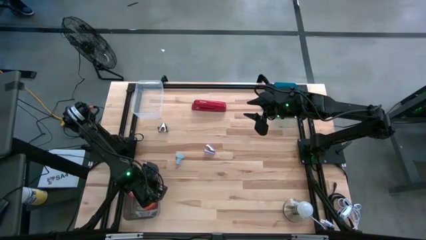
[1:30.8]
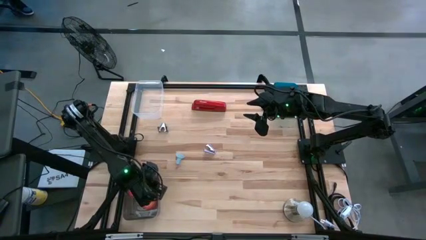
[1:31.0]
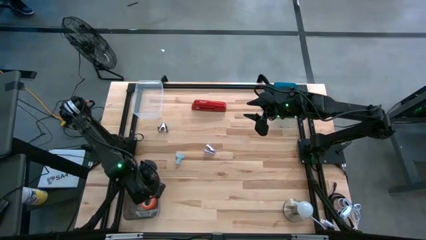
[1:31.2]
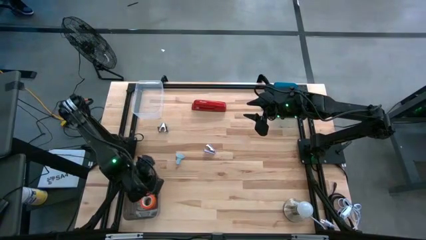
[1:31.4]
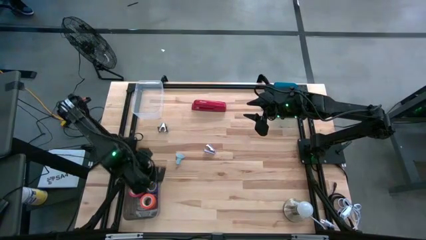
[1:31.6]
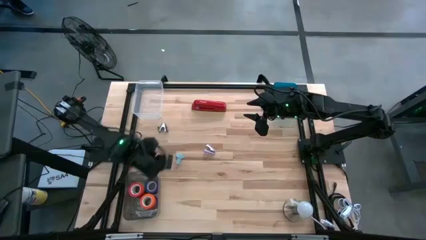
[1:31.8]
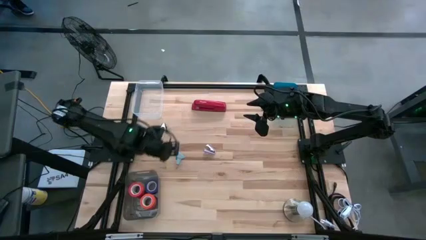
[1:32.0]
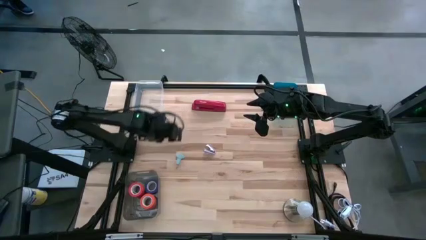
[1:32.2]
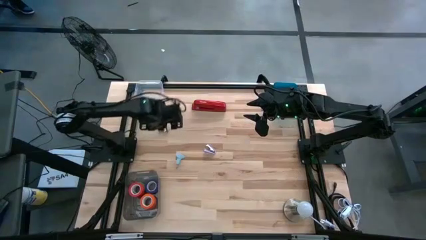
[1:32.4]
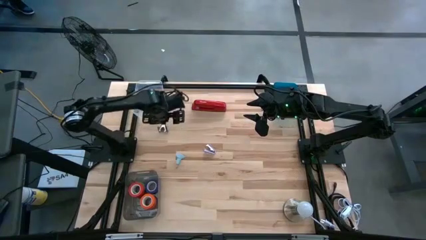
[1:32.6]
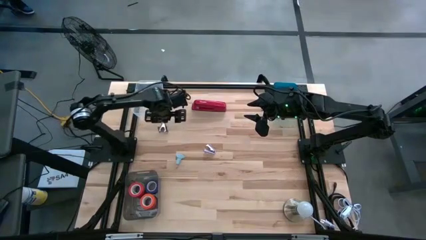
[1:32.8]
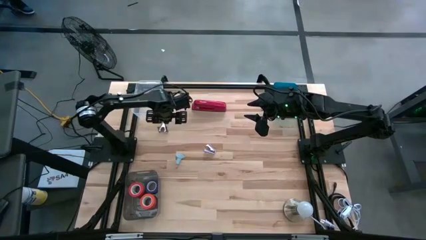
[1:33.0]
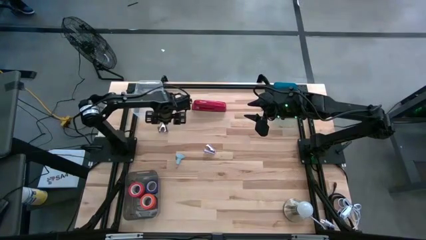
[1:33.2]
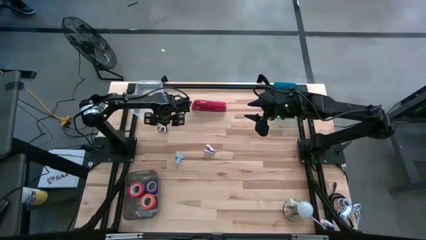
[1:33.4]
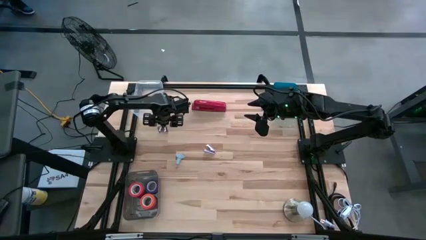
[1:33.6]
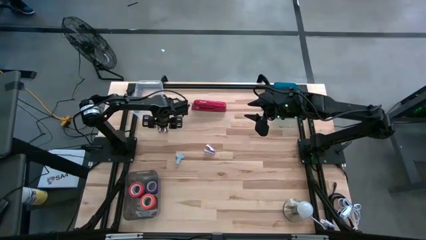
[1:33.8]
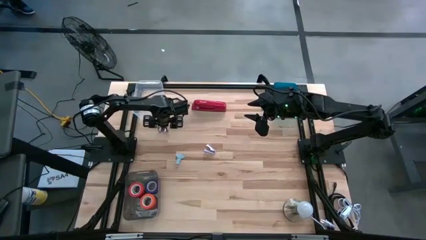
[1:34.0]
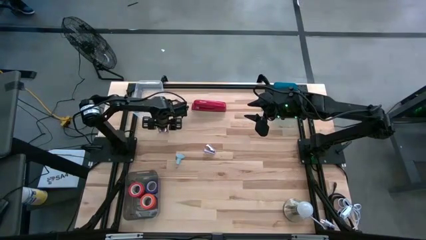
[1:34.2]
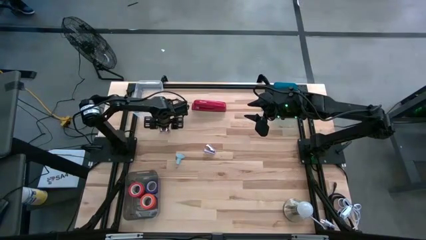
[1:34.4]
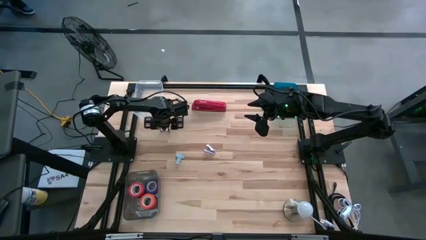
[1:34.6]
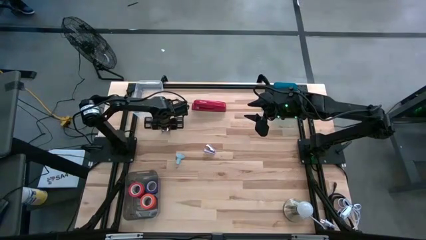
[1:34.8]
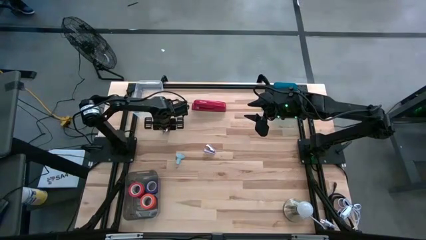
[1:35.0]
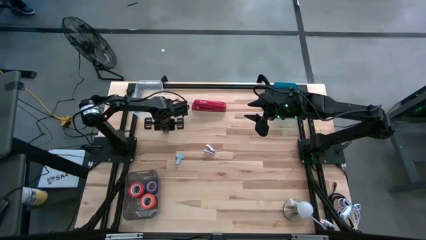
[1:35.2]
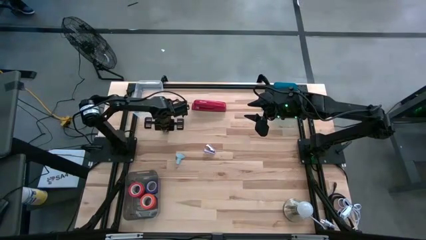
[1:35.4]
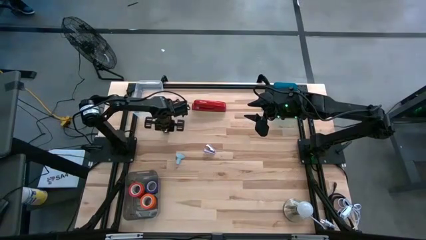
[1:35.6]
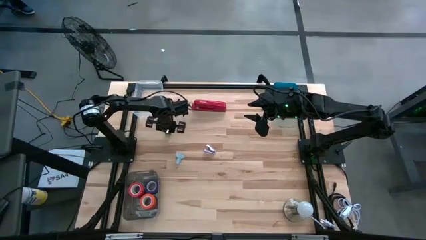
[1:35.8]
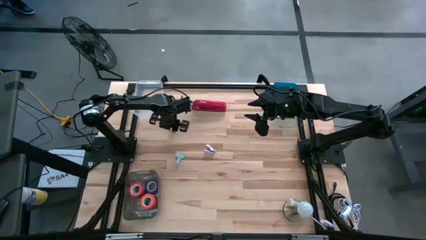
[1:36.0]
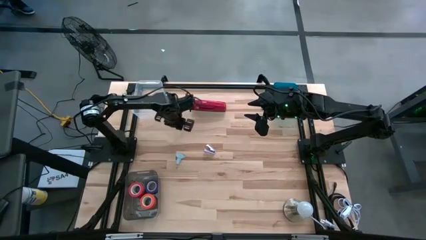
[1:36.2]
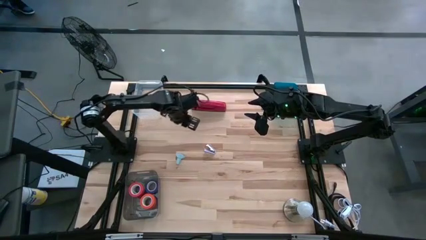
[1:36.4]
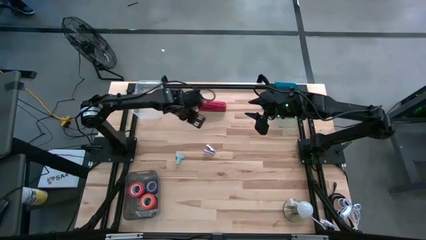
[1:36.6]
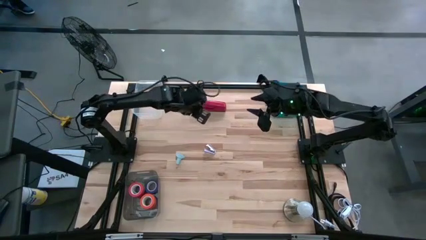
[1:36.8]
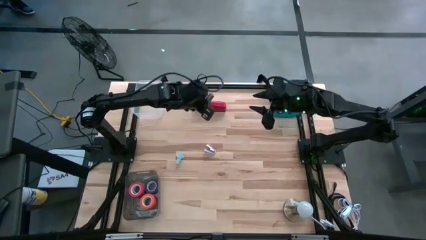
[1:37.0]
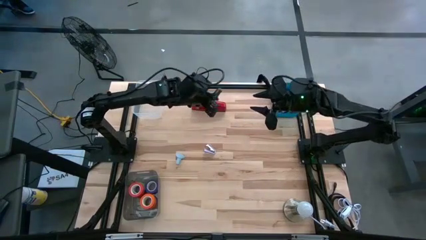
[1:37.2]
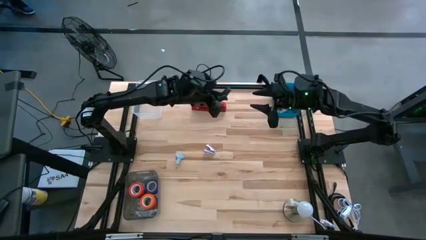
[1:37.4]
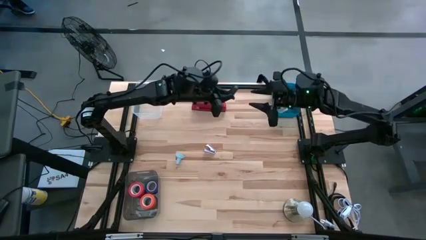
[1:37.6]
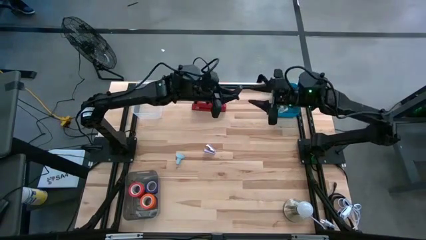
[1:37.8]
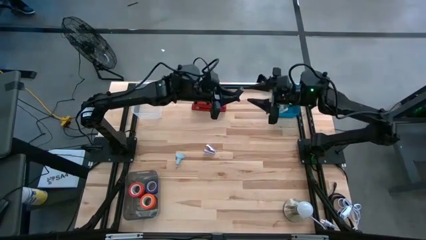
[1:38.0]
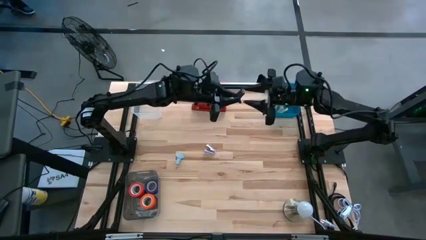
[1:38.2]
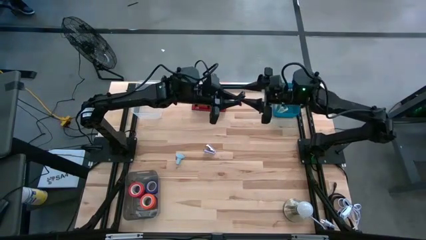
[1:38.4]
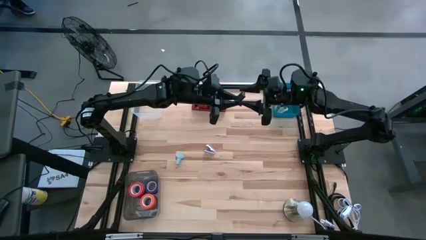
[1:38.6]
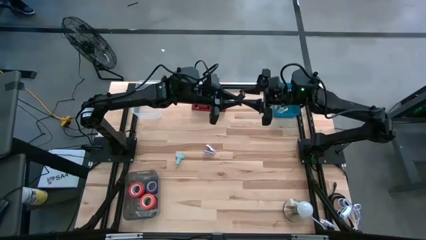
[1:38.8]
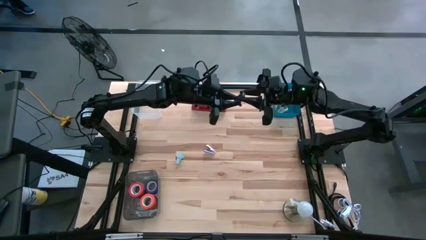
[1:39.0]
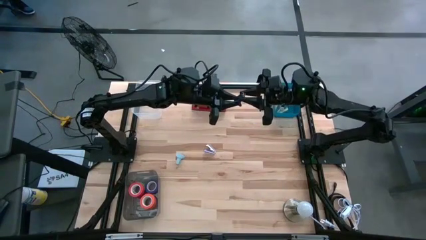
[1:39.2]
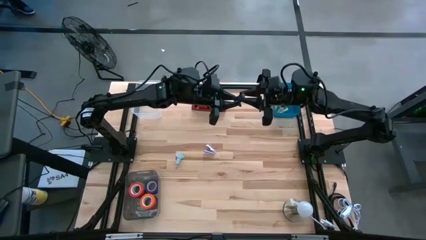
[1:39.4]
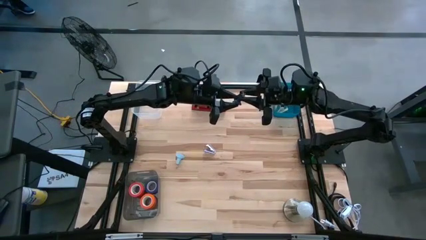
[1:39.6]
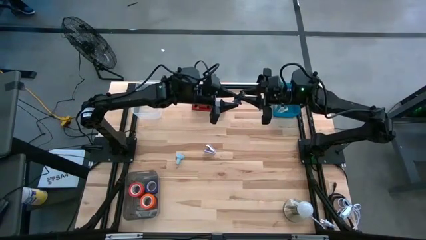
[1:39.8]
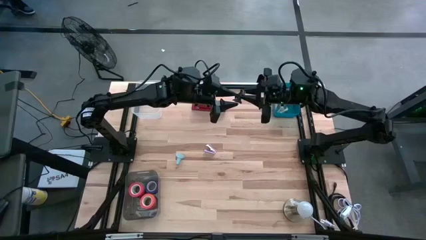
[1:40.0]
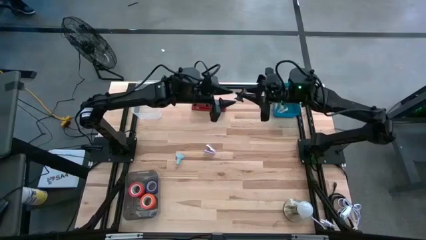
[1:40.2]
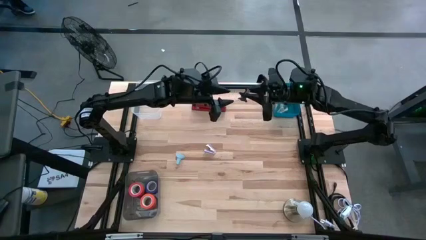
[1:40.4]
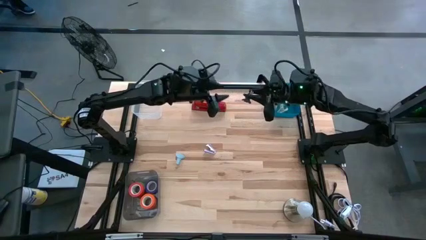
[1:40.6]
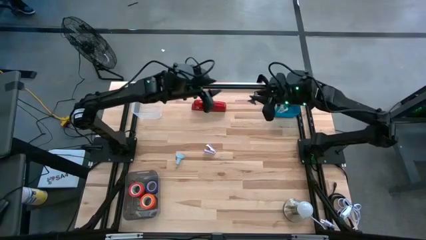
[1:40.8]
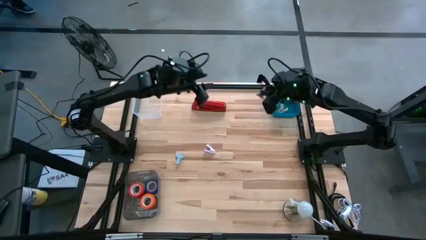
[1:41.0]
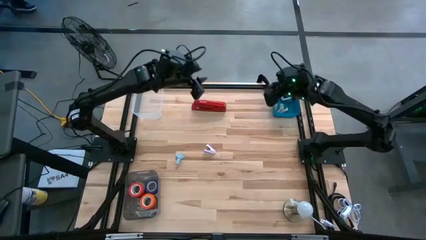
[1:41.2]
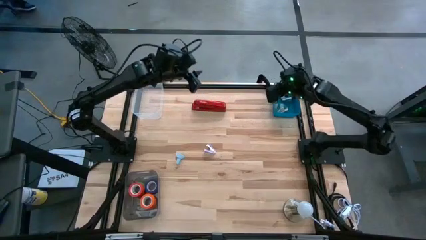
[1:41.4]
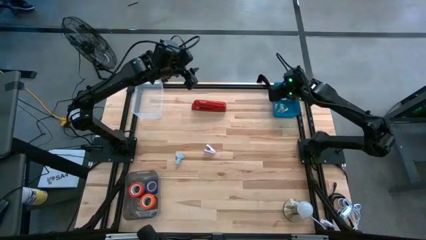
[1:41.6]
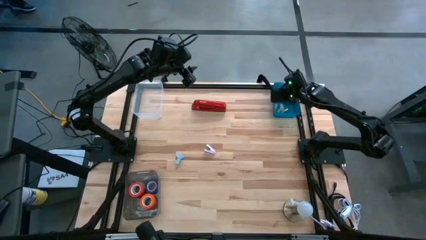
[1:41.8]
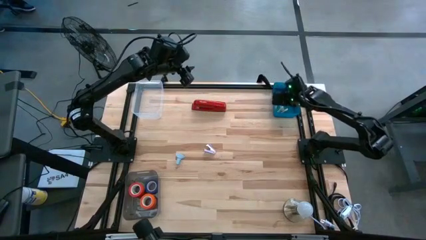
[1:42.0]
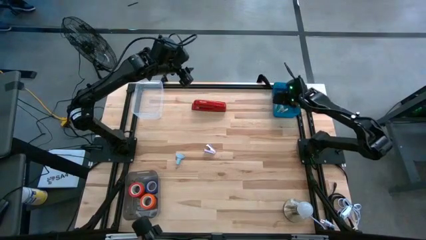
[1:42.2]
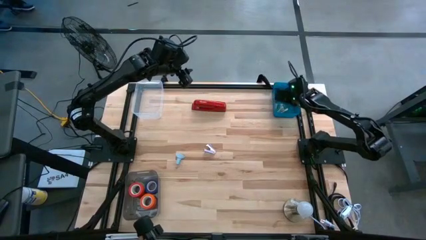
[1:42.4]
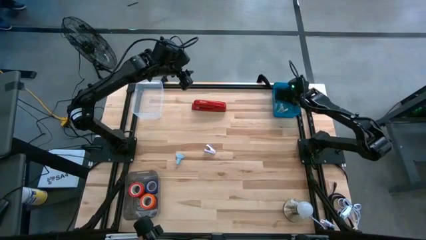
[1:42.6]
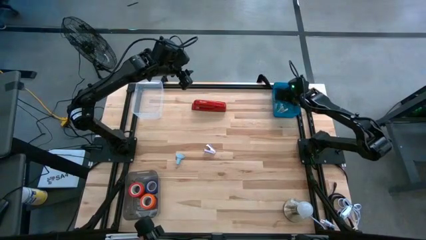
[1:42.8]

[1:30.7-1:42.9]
Task: Pick and place Stapler, Stapler remover, tape
Put the black staple remover into the blue bin
